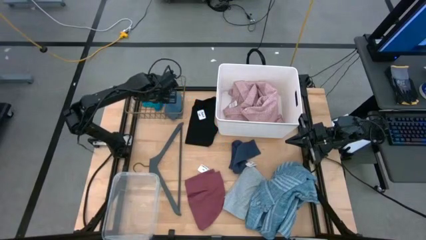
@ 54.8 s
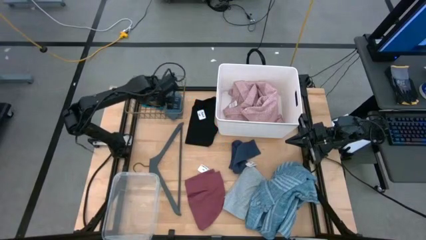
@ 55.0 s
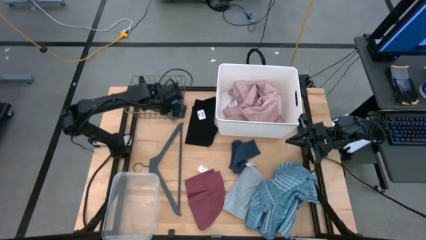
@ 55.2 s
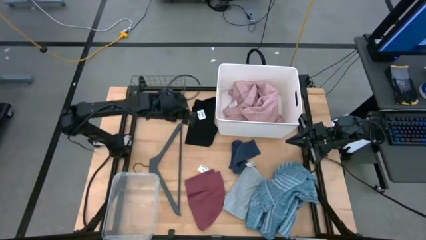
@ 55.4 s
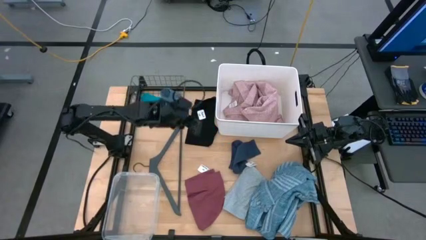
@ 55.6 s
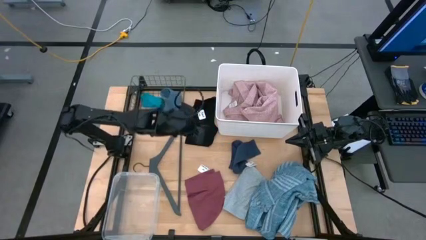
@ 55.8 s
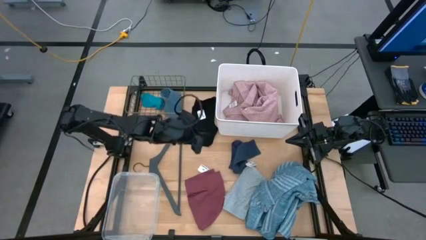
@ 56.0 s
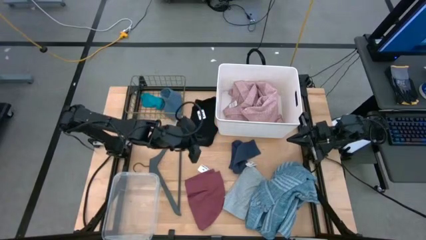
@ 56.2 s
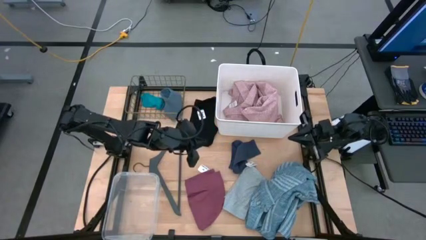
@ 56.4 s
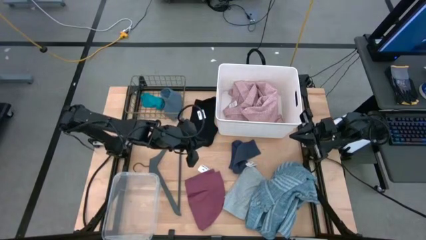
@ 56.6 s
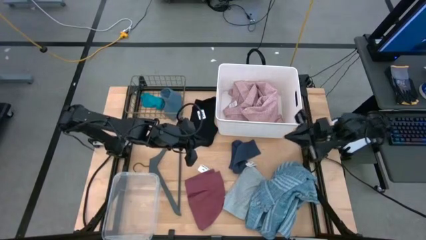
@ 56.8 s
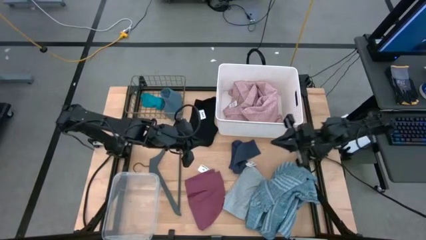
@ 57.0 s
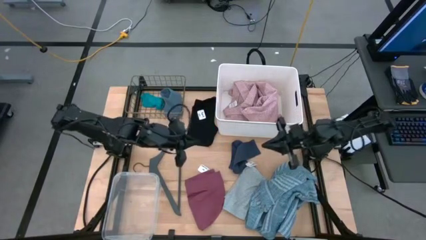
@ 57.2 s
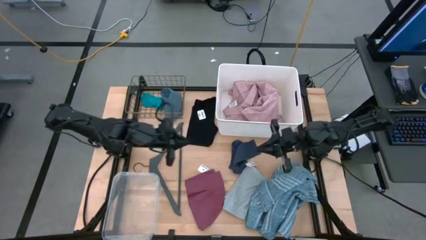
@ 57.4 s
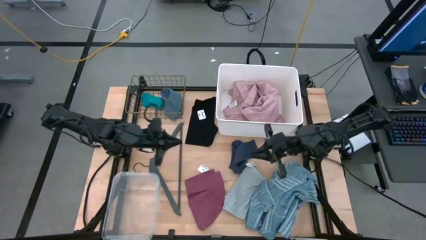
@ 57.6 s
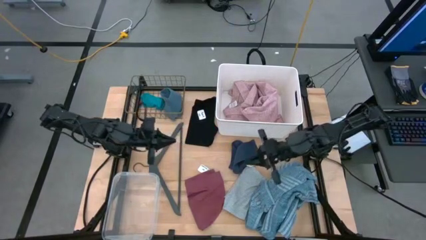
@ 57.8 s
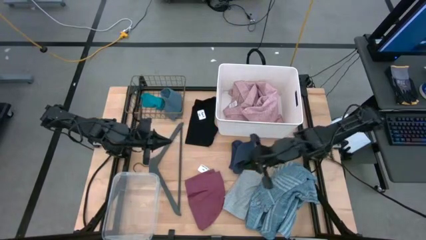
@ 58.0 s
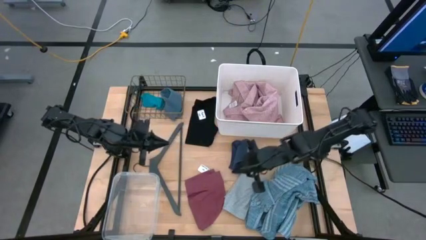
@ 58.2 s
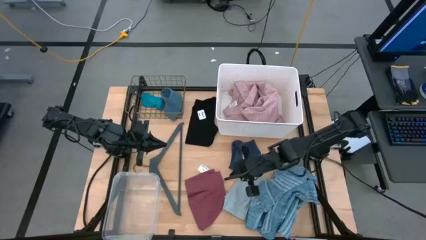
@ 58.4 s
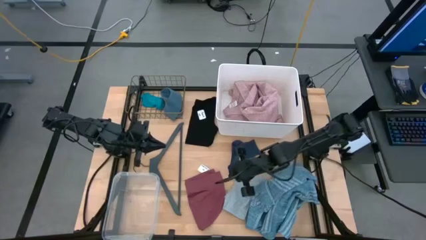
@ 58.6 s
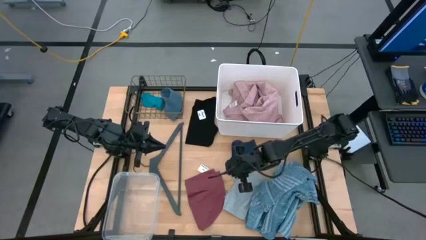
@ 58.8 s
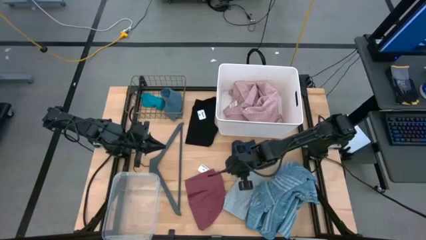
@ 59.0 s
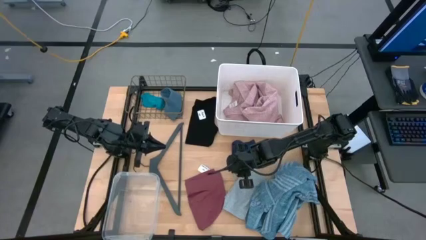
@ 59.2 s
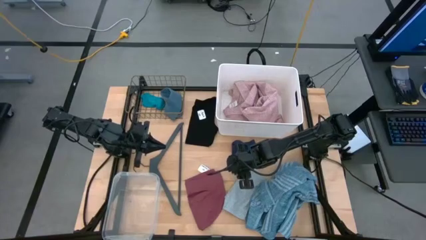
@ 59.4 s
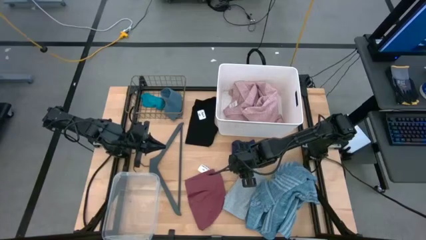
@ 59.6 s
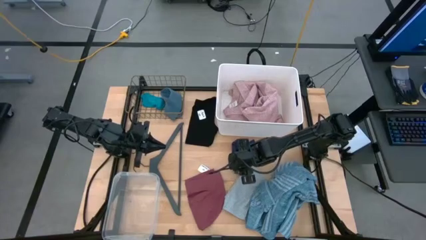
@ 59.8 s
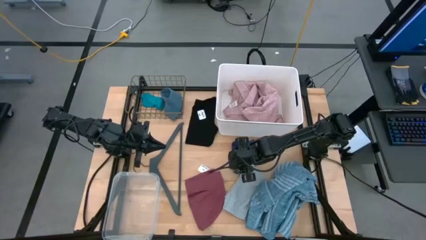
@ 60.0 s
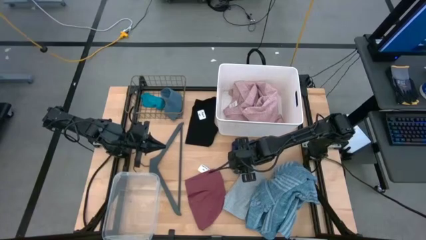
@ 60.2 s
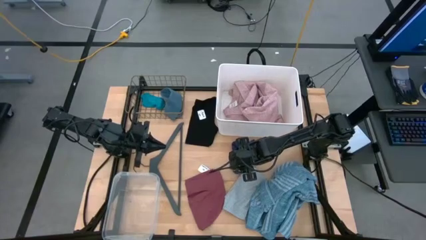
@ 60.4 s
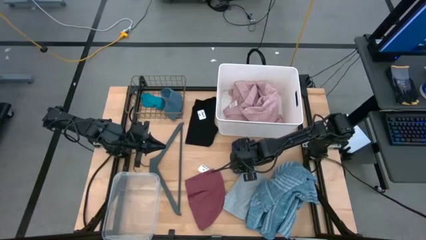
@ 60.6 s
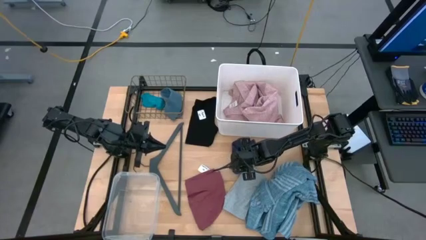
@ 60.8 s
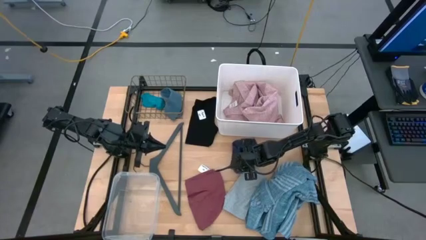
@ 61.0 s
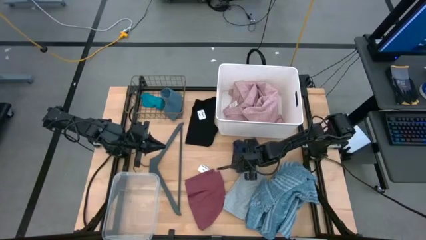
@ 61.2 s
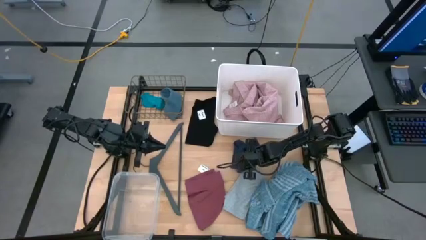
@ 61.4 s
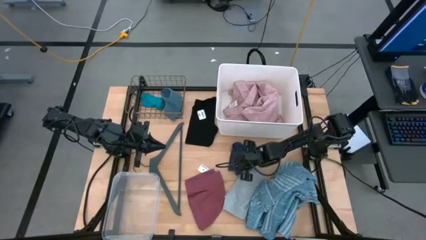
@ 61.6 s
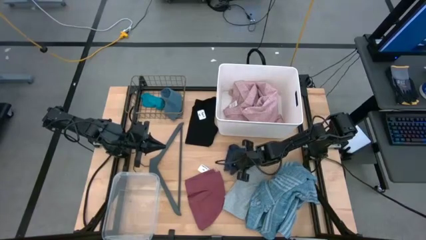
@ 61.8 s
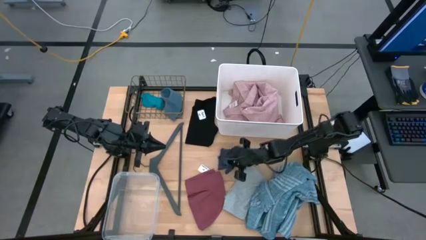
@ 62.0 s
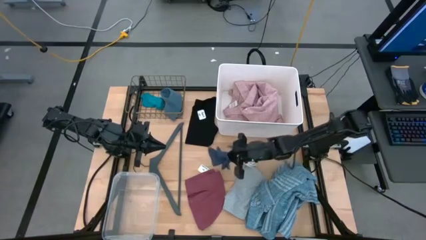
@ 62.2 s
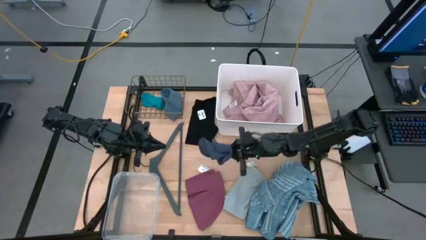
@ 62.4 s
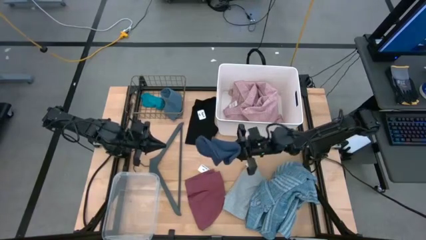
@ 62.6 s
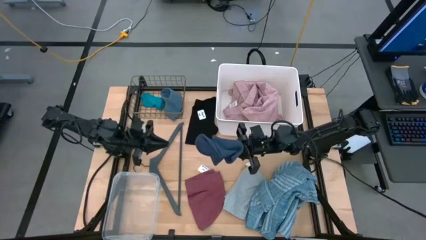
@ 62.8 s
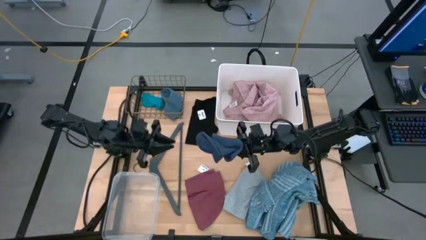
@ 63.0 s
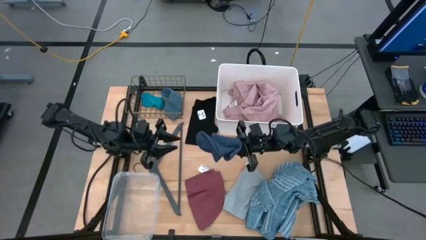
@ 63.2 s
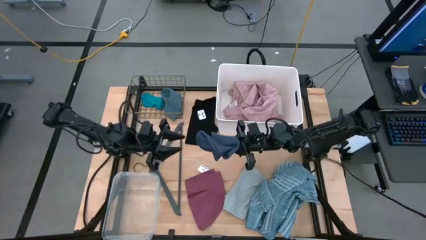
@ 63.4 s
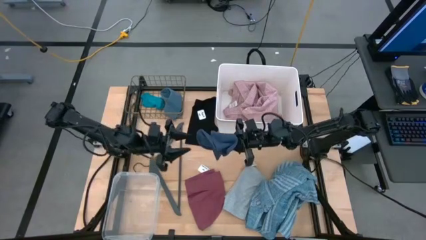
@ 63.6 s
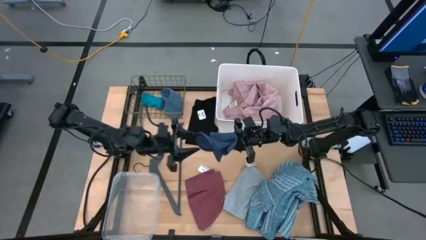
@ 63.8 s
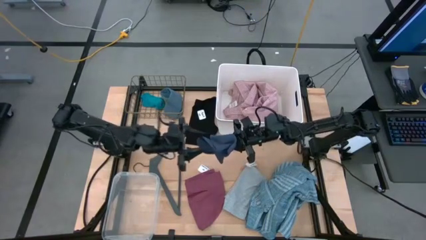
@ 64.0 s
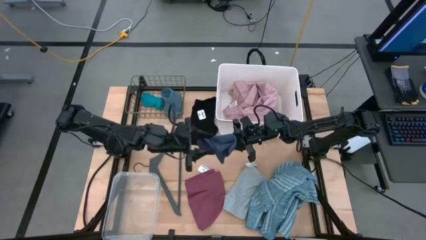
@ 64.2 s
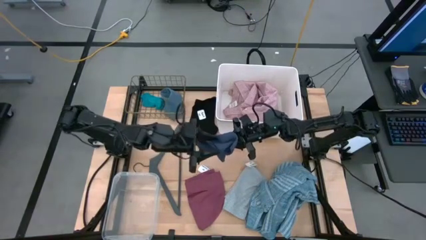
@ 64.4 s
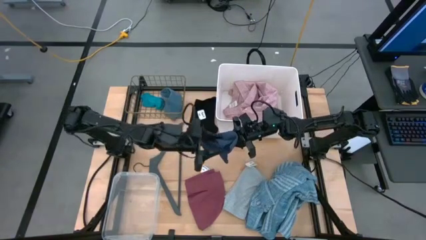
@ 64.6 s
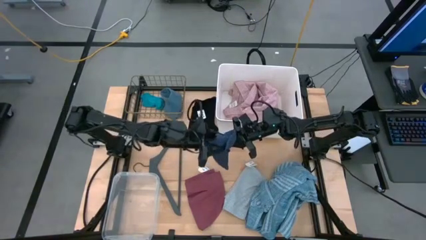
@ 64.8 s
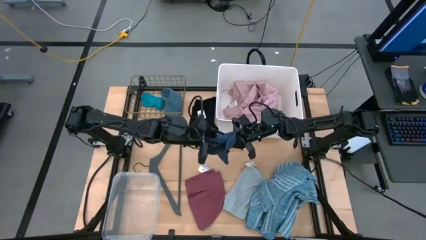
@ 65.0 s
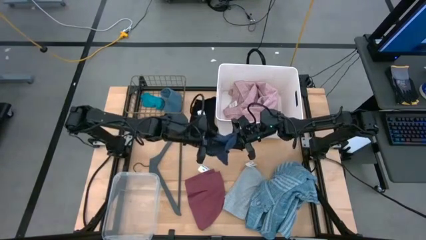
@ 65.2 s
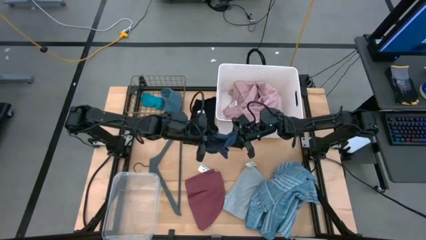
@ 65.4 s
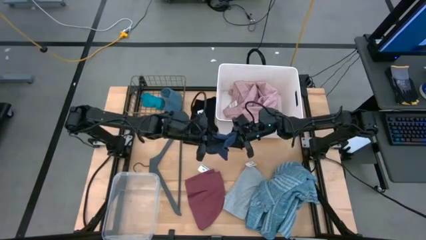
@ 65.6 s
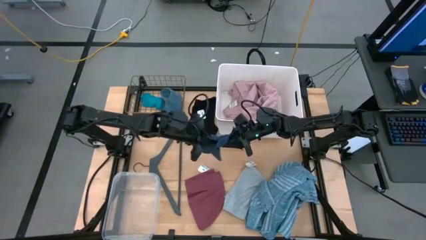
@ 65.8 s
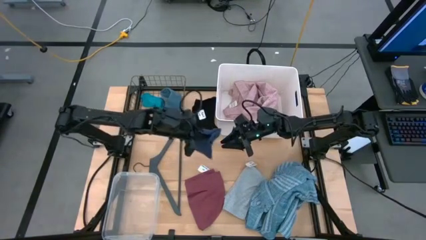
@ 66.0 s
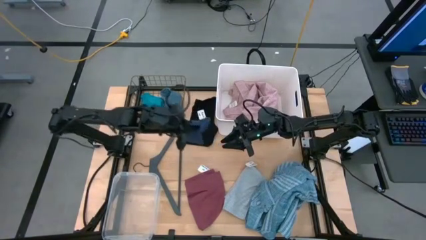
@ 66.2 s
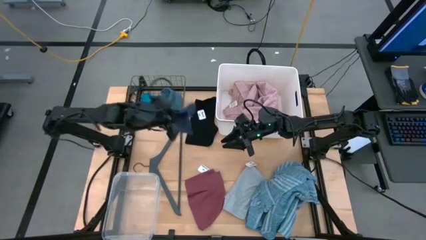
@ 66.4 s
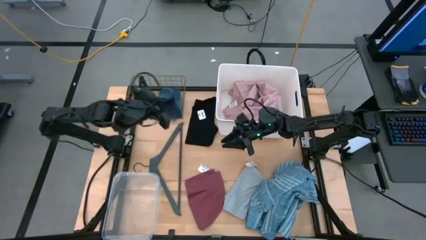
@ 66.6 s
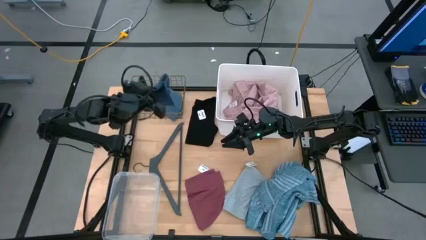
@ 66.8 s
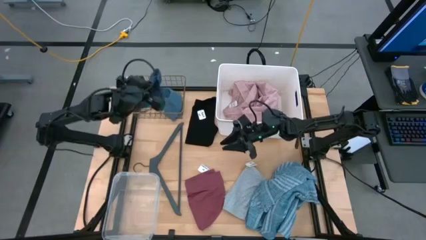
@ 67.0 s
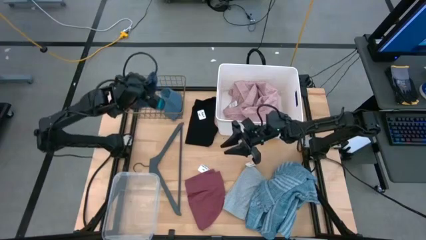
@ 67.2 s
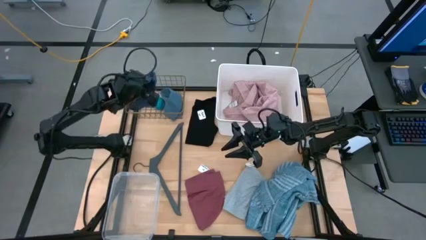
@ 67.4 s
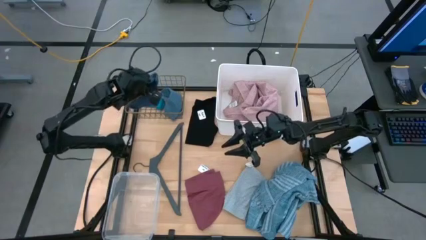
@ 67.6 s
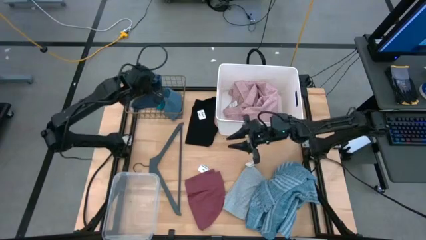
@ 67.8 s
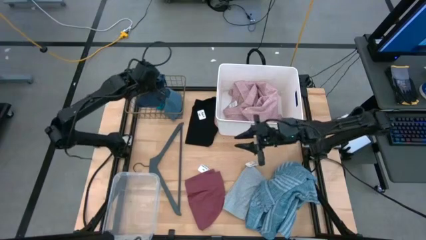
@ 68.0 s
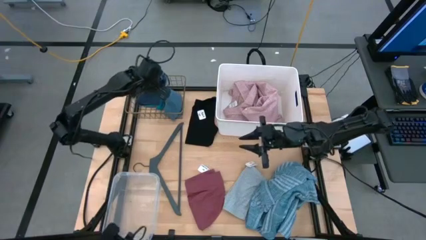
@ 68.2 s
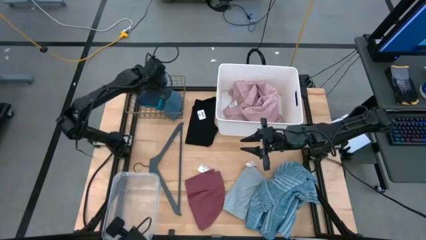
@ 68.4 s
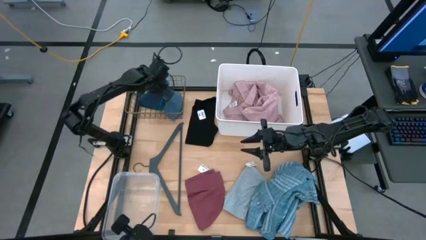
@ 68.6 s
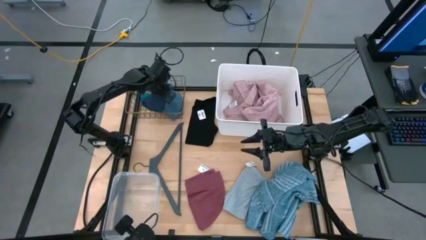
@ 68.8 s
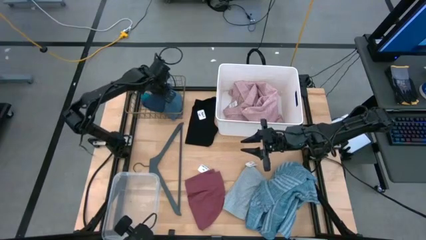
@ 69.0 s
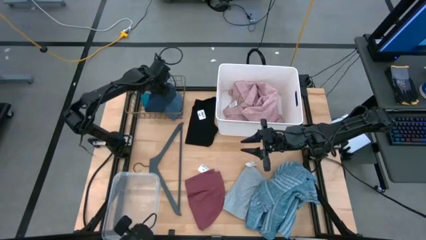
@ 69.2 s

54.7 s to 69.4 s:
Task: Pick & Place Cloths
Put the dark blue sock in the gold wire basket

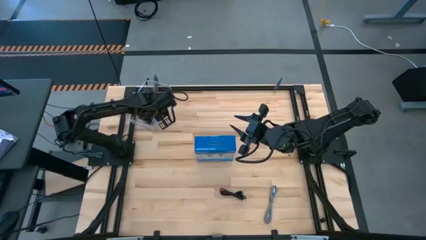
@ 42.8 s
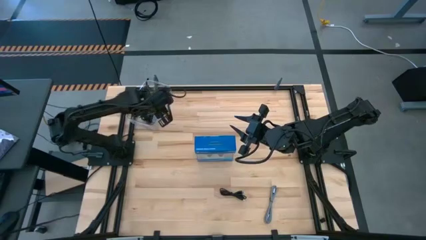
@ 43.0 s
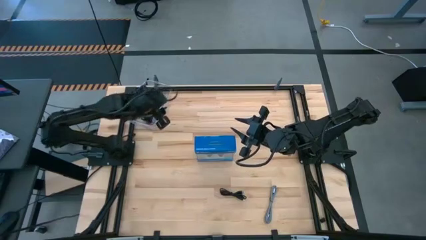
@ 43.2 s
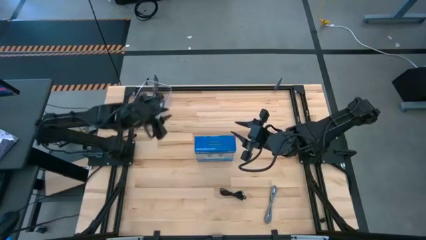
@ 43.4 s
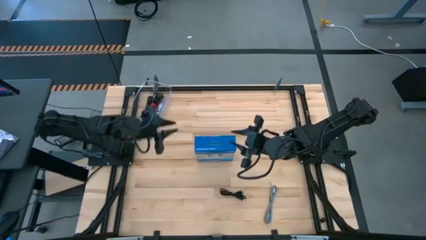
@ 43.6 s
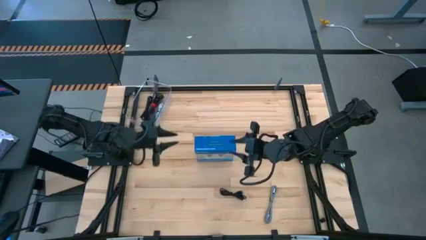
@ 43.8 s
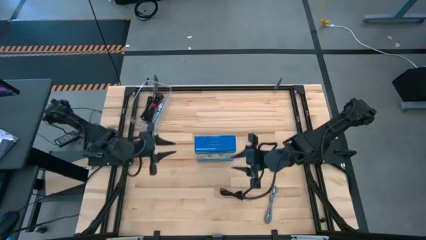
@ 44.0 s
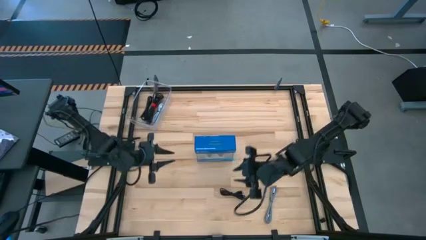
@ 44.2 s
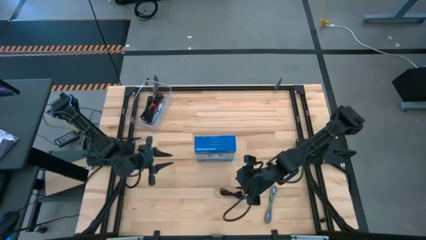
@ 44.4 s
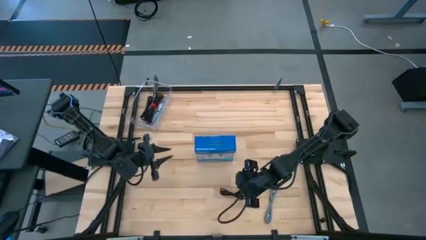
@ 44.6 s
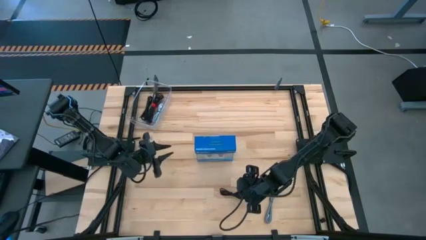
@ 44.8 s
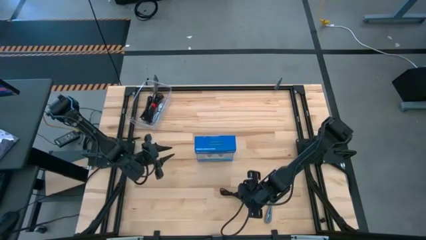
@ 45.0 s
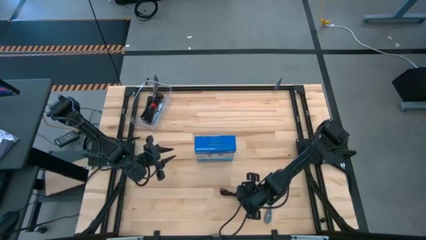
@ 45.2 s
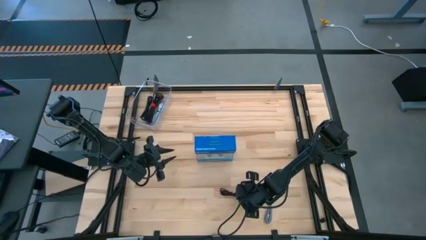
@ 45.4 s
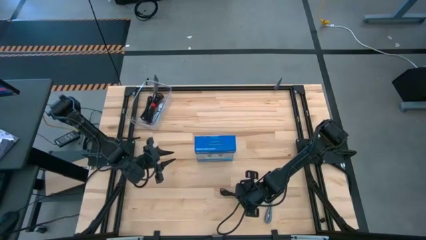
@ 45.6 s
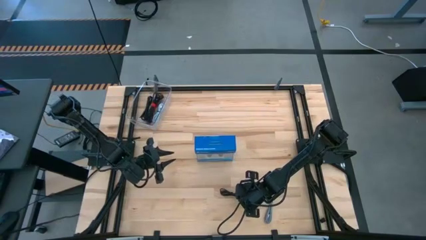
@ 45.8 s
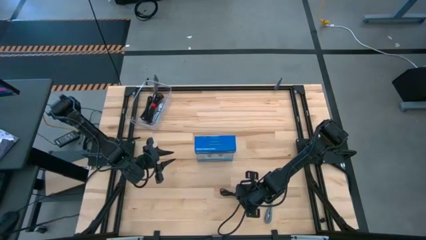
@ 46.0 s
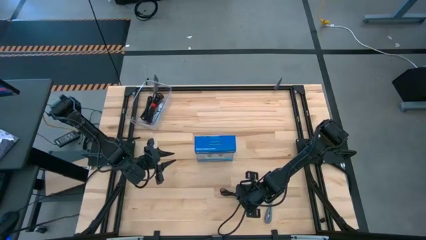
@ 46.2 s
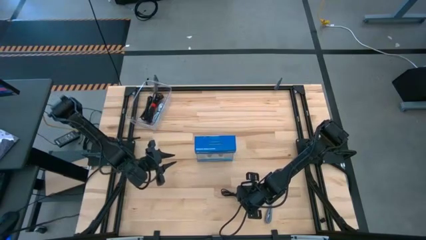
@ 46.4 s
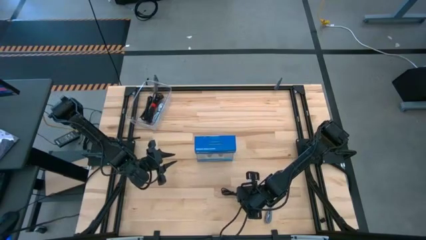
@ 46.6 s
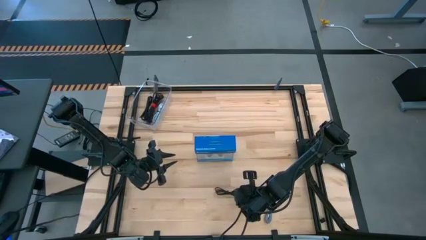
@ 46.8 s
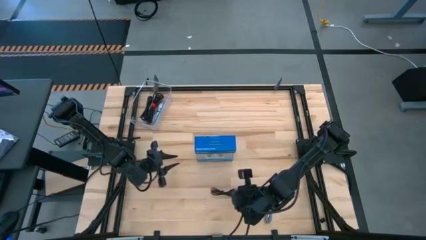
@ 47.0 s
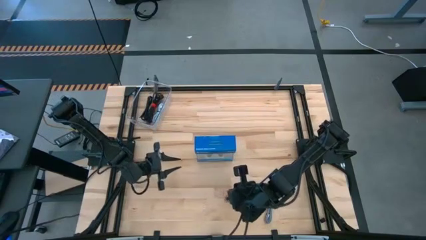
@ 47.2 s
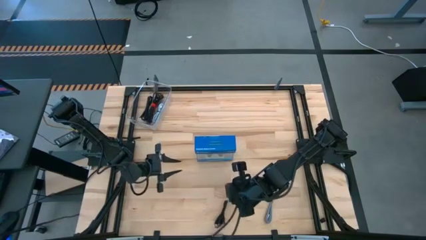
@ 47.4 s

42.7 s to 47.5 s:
Task: Pick and place USB-C Cables
Put the black charger cable into the transparent bin
